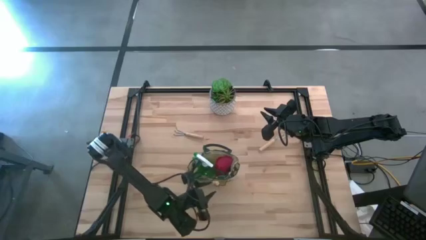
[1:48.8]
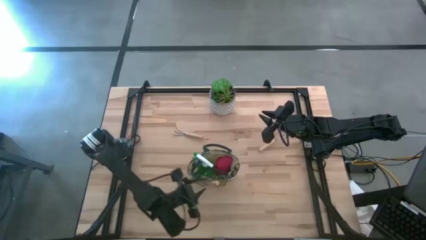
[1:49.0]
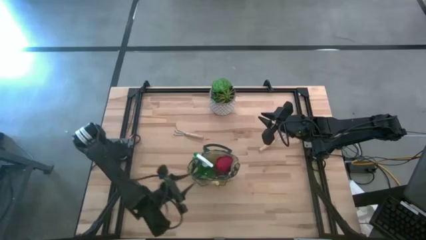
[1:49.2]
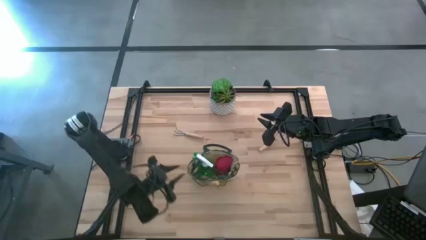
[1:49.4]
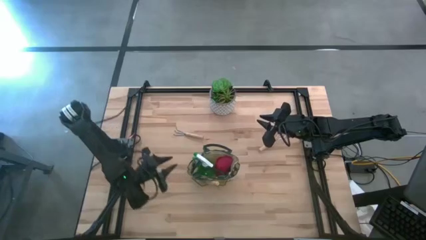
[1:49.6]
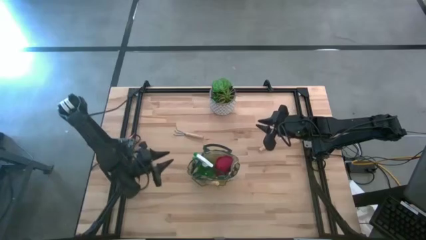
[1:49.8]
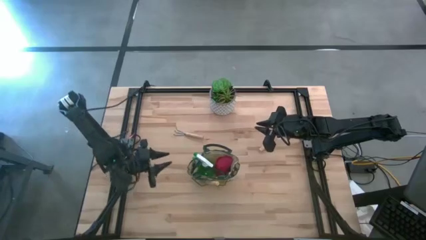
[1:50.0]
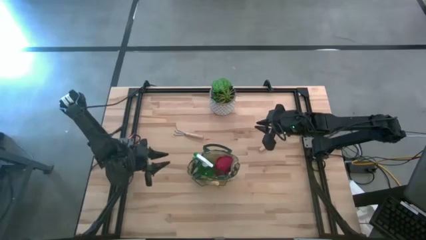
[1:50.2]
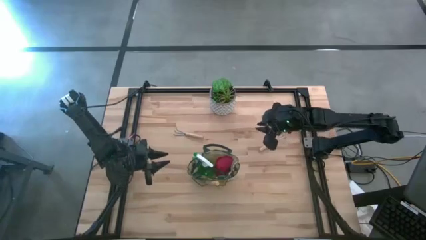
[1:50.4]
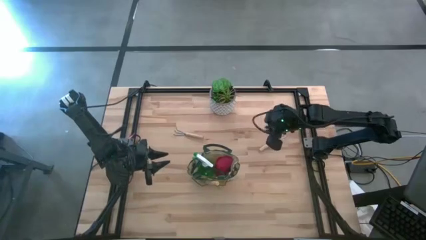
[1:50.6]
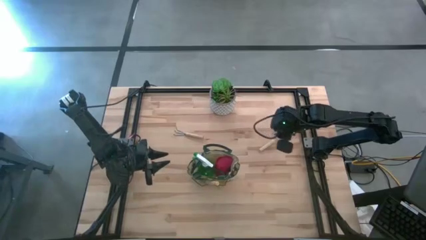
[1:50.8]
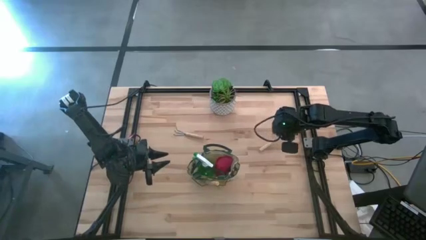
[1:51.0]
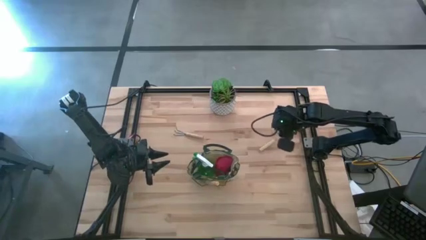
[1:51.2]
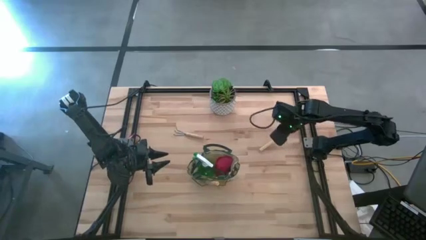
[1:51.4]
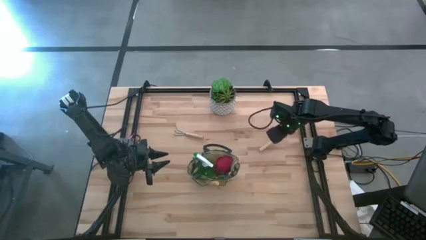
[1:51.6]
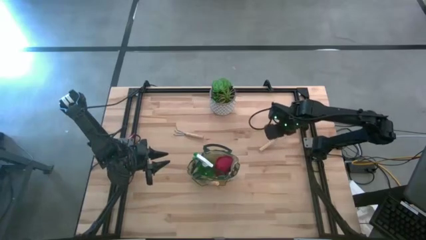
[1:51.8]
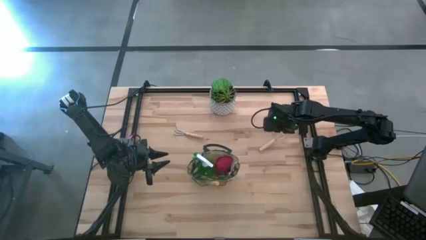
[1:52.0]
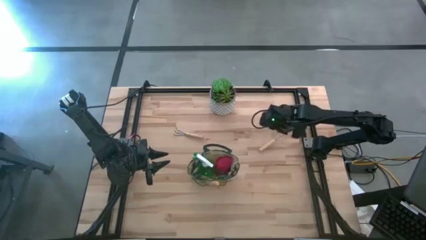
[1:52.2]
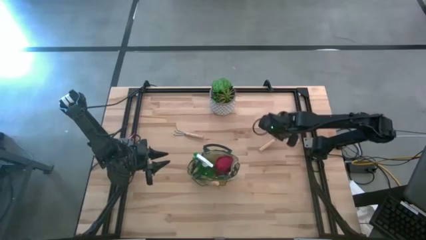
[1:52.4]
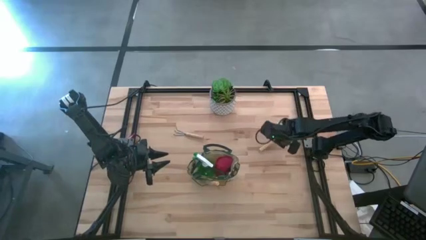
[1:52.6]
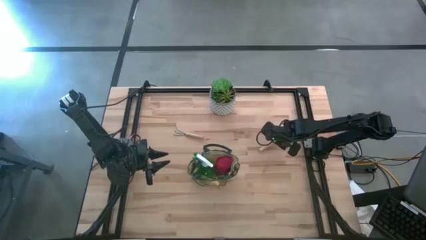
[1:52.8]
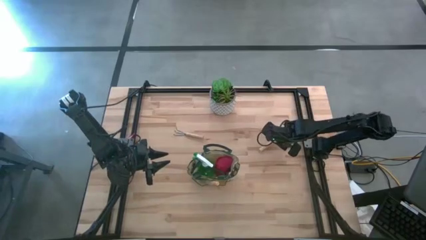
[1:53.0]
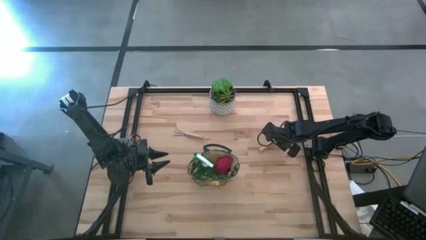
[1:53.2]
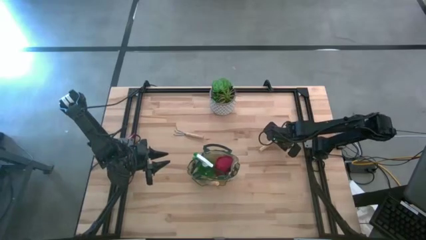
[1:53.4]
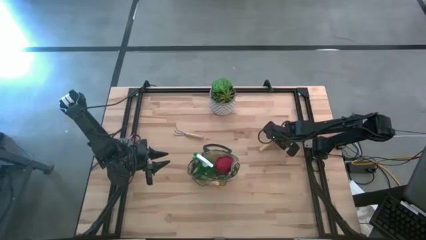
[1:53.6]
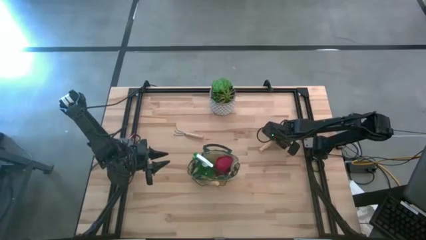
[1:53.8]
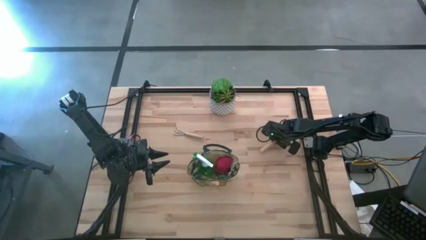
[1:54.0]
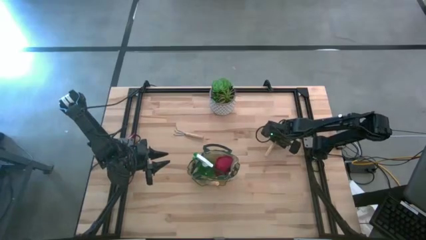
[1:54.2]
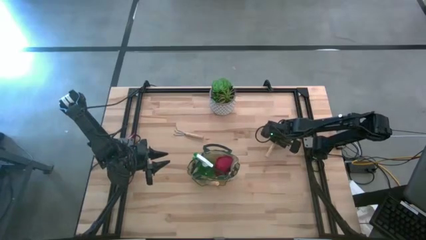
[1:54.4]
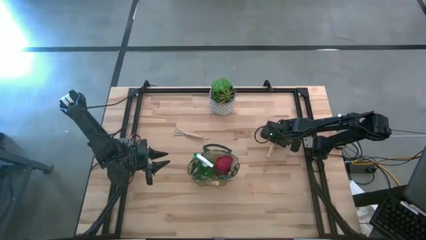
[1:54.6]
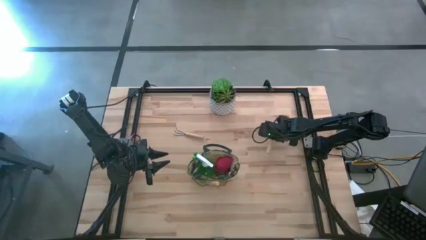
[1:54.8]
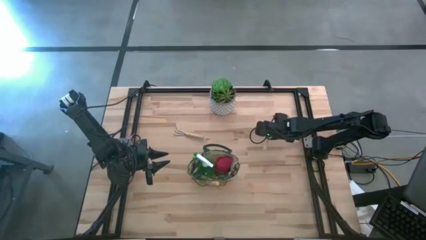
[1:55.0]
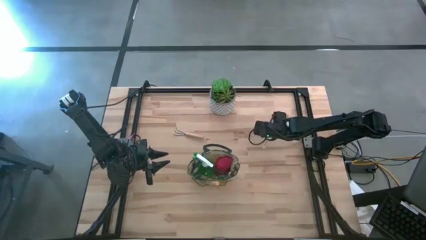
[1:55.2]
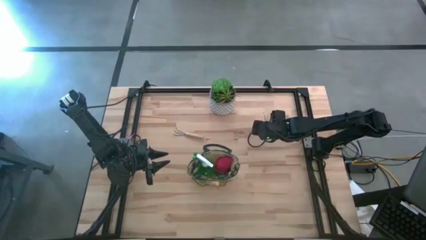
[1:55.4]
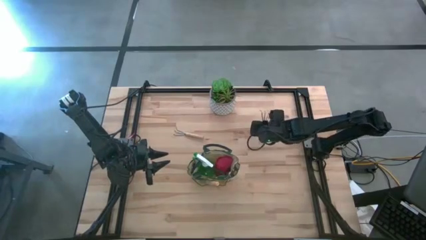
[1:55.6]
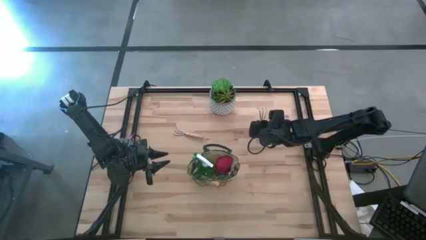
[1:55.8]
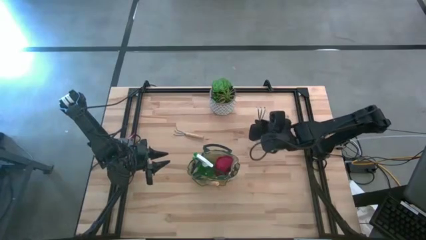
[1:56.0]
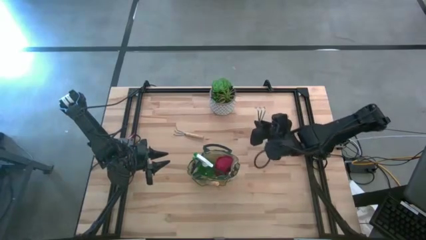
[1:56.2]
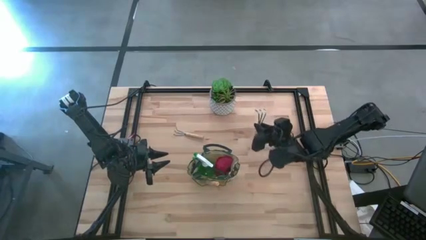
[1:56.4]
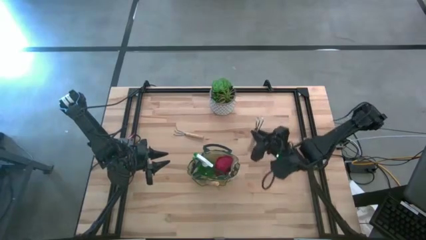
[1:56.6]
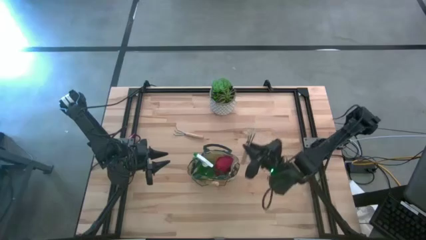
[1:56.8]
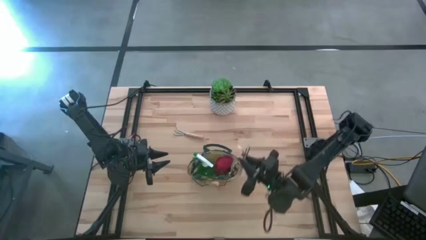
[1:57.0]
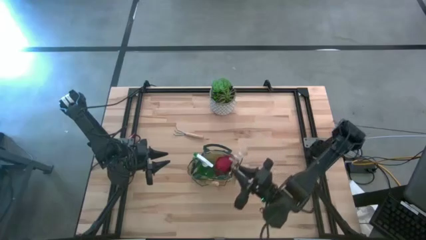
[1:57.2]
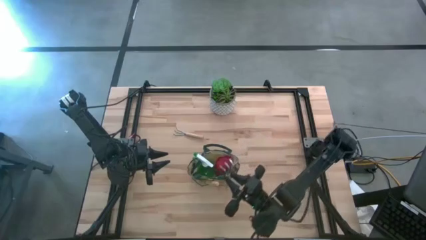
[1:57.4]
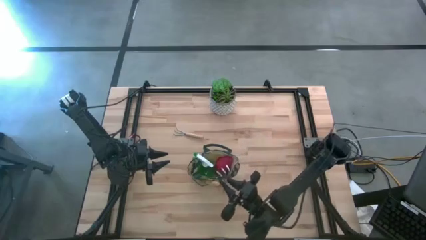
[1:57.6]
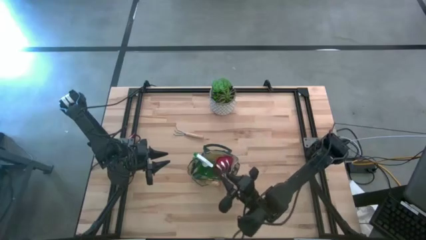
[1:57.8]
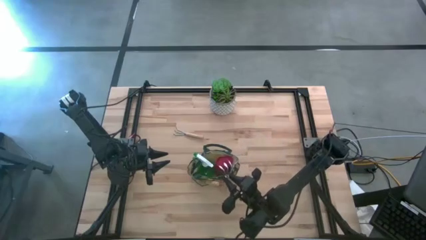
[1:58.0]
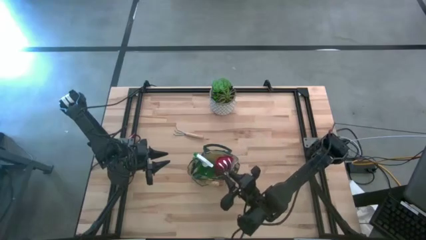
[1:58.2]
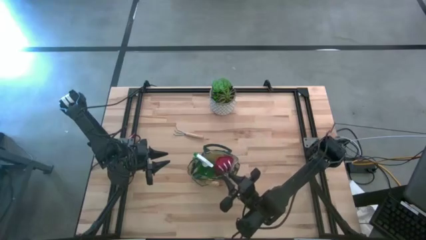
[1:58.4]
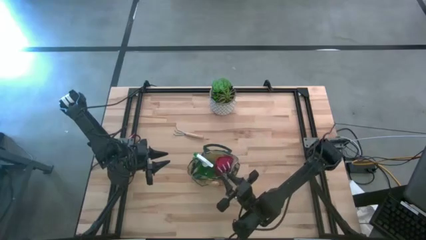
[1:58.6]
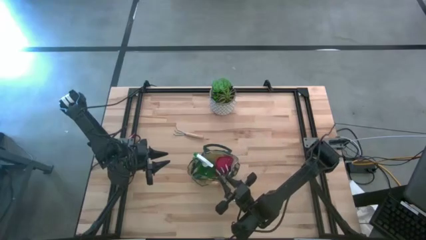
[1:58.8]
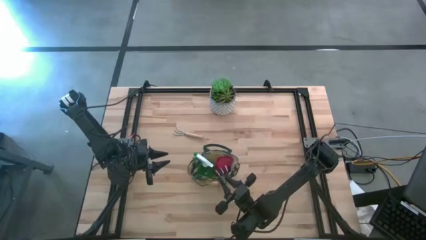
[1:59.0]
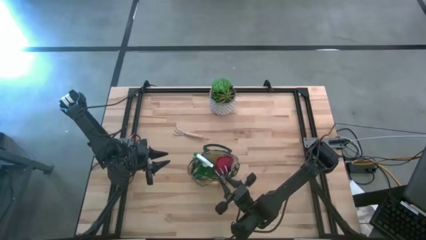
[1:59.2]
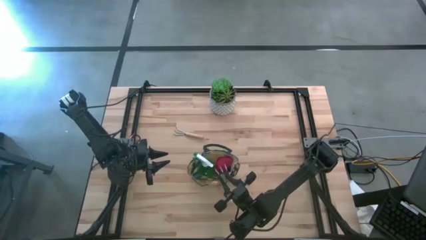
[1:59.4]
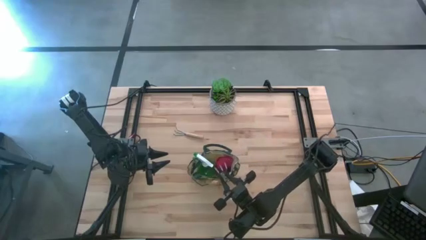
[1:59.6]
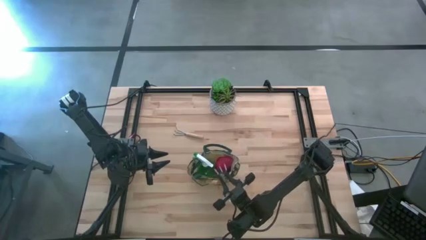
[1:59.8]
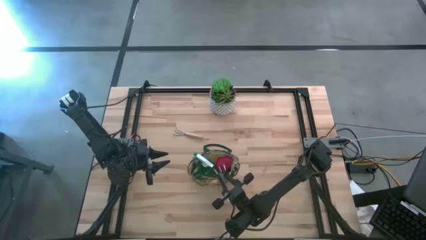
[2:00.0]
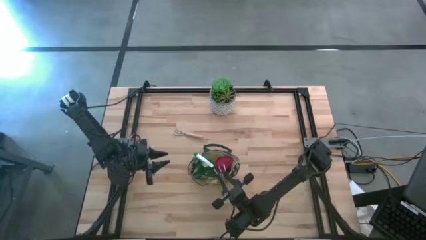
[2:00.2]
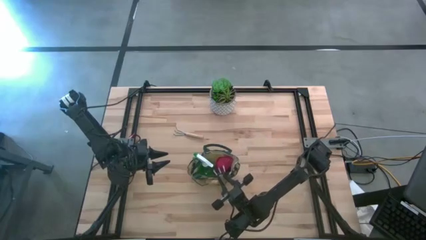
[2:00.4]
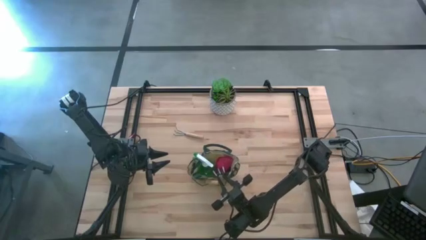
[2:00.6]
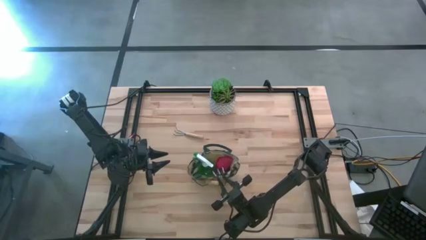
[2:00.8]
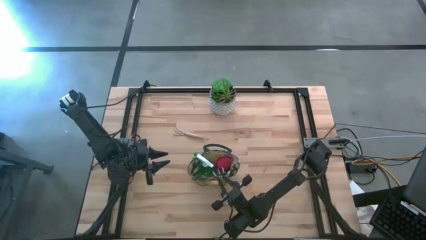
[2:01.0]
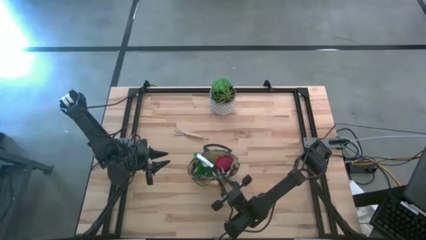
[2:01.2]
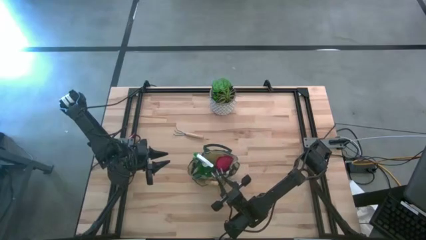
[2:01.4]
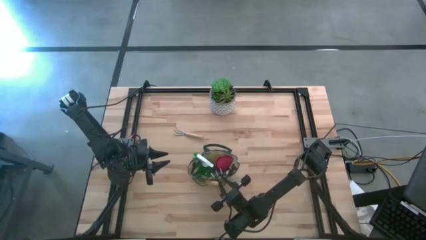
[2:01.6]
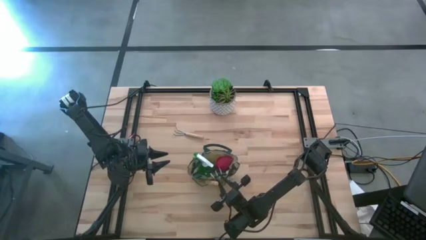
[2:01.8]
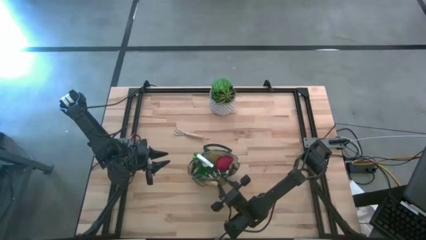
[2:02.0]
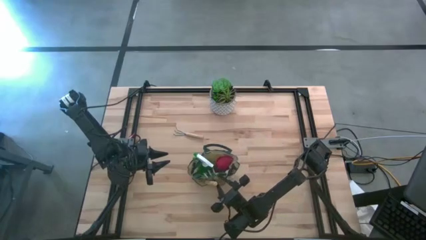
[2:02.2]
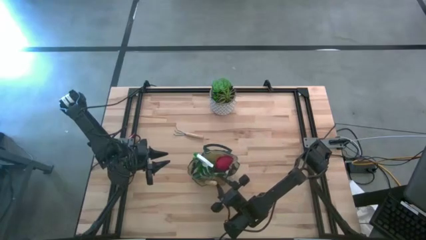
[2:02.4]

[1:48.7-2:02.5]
Task: Pick & Place Garden tools in Gardening bag
Put the right light brown hand rake into the white gardening bag

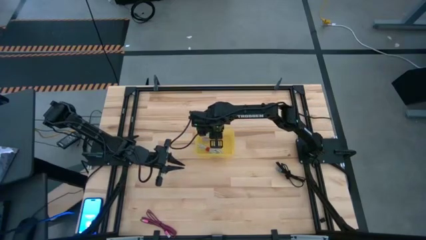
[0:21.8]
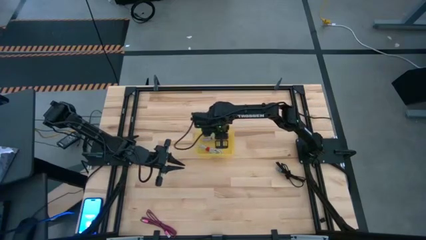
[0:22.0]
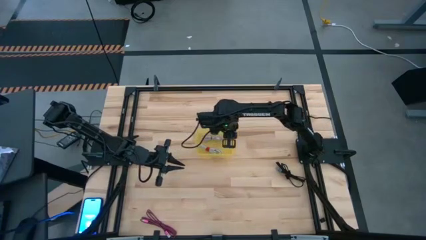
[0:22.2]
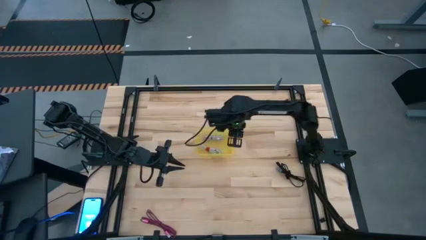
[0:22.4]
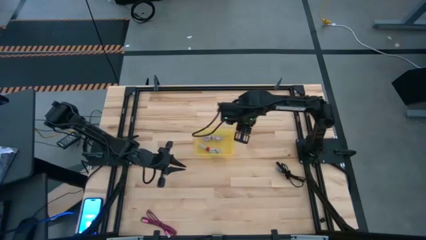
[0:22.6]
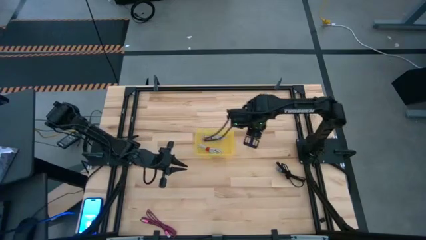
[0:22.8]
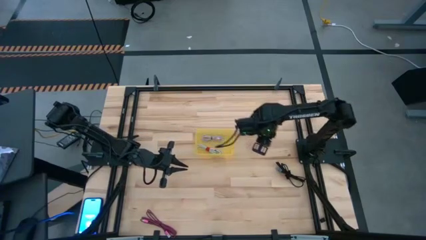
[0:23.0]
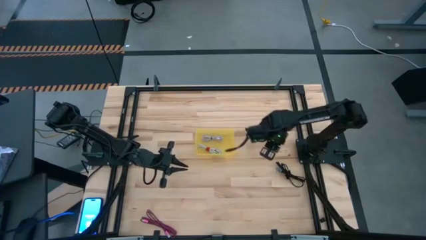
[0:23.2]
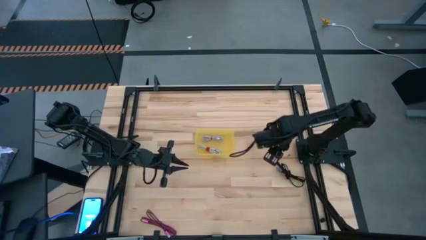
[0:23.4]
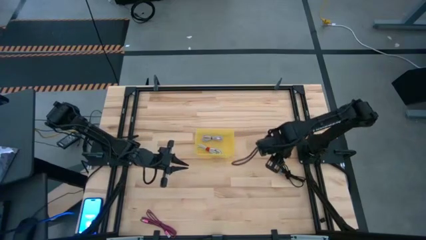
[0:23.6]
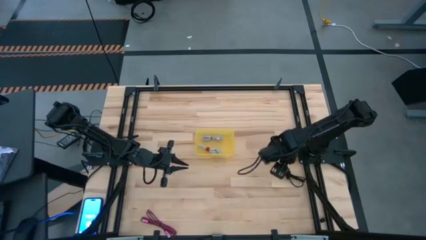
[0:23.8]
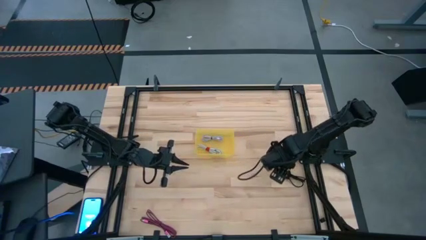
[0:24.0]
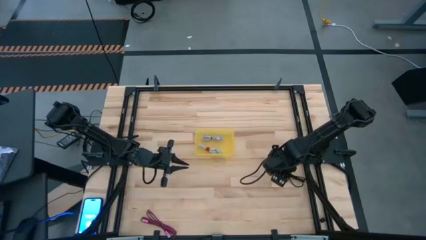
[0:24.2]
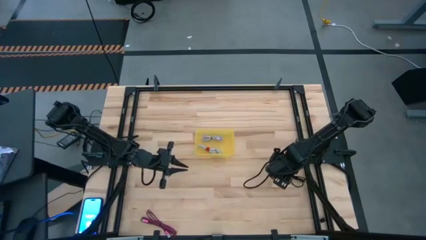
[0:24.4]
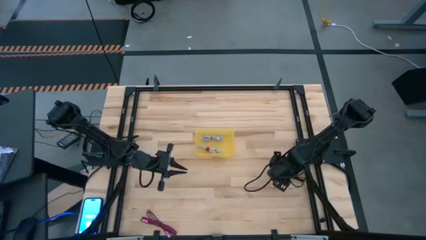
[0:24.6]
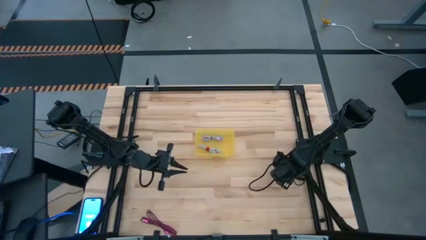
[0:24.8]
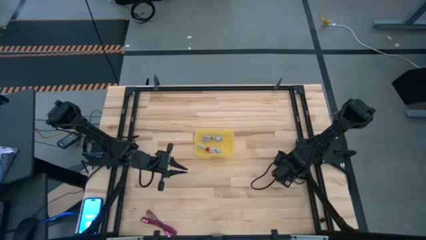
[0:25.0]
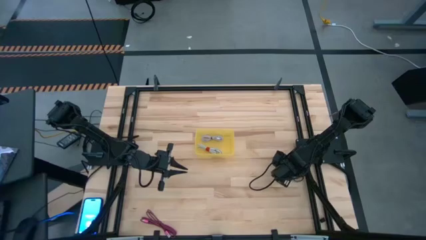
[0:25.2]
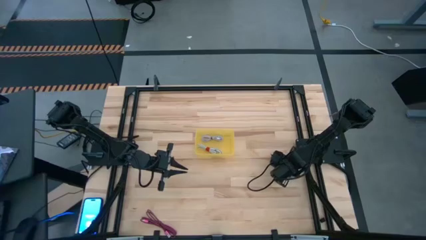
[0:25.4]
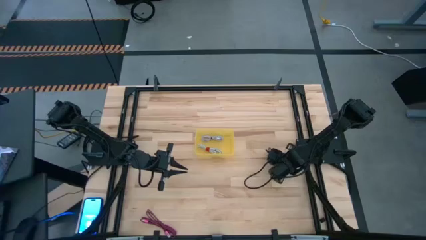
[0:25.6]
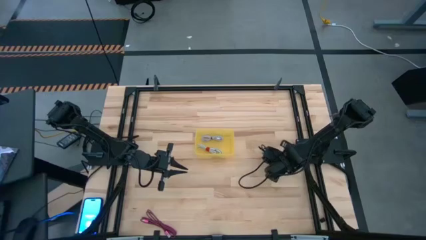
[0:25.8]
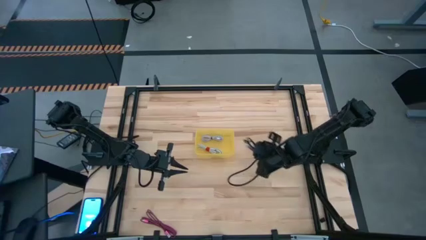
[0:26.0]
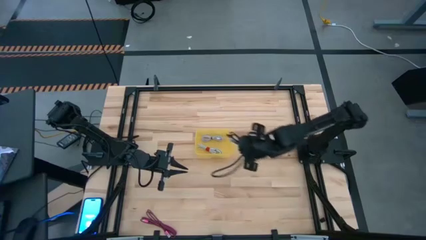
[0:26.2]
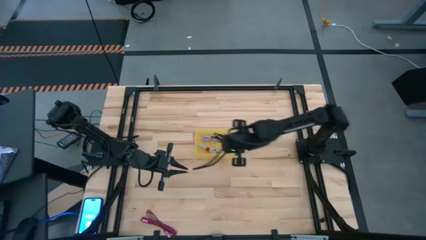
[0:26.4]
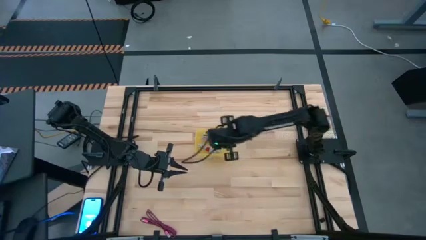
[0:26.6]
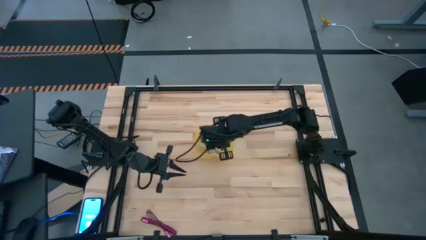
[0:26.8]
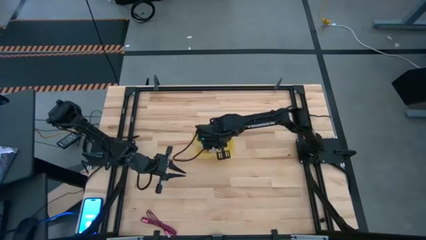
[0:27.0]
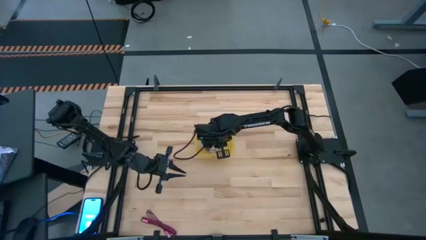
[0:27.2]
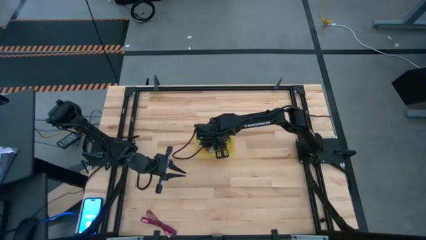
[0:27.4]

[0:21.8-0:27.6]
Task: Pick and place USB-C Cables
Put the black charger cable into the yellow transparent bin
